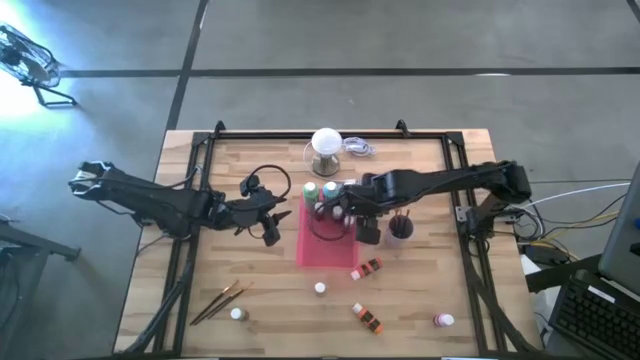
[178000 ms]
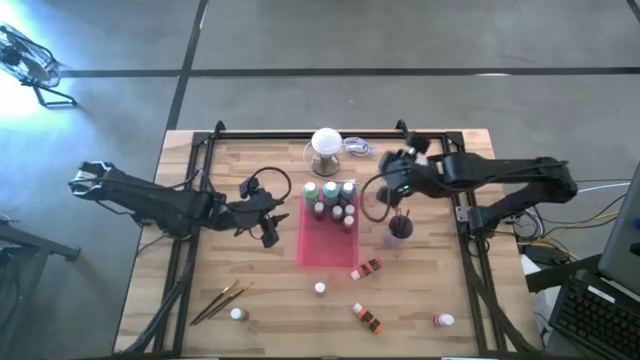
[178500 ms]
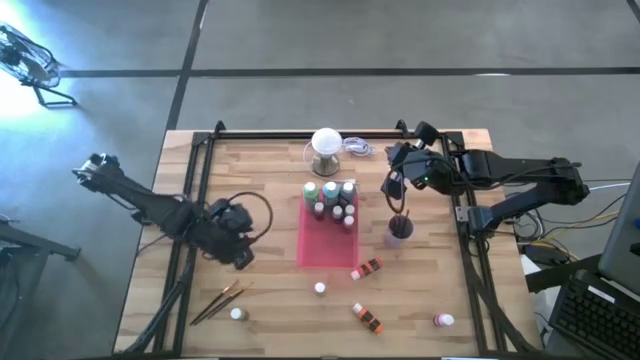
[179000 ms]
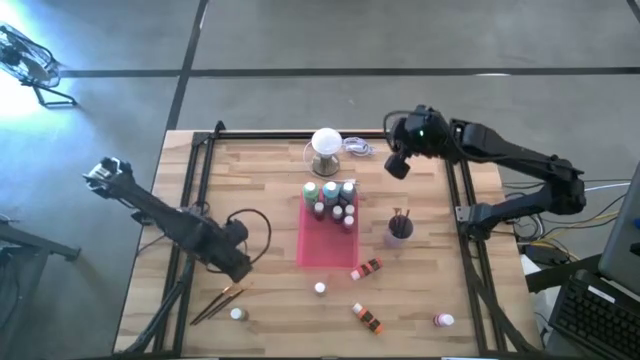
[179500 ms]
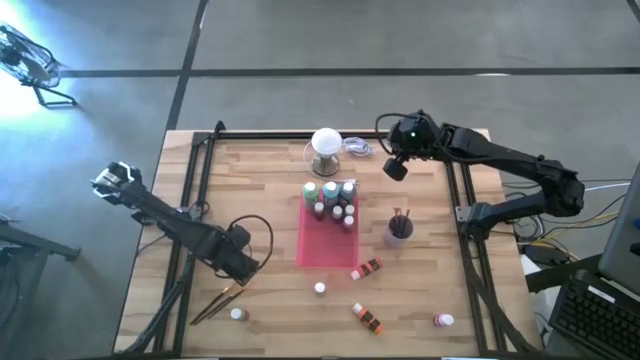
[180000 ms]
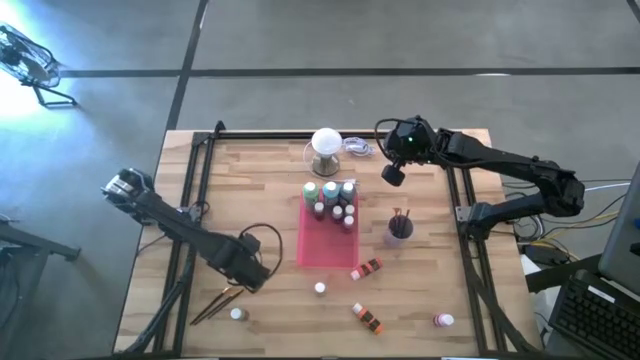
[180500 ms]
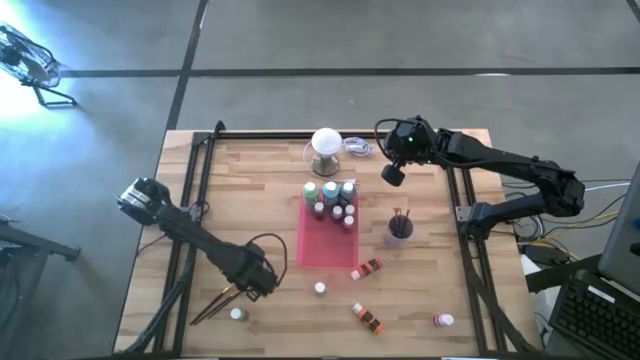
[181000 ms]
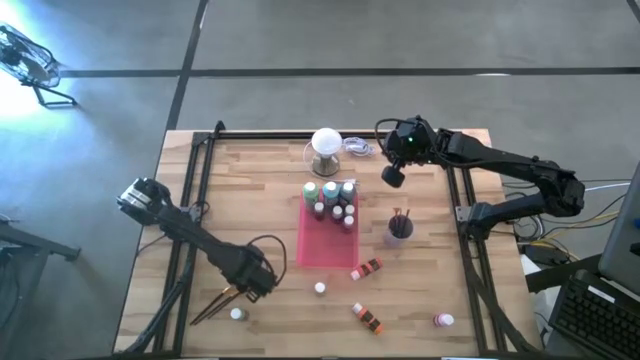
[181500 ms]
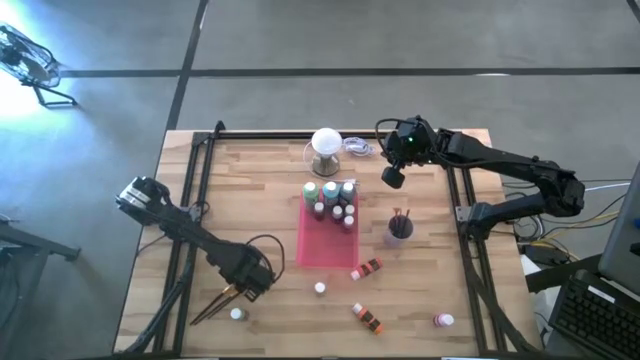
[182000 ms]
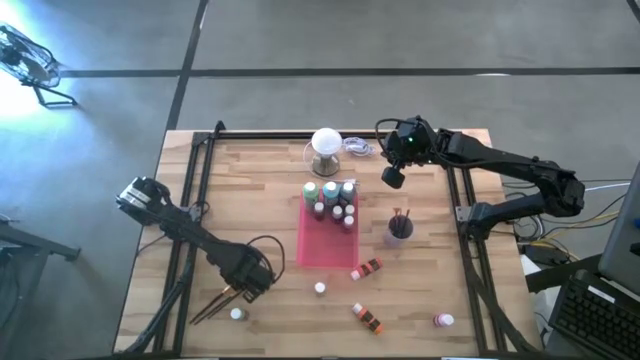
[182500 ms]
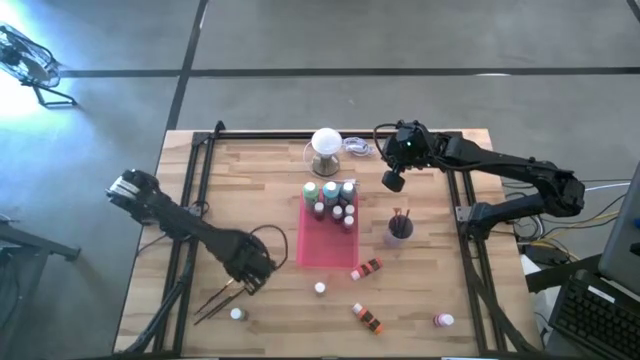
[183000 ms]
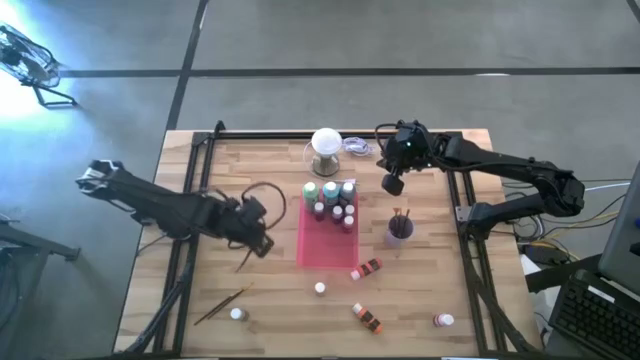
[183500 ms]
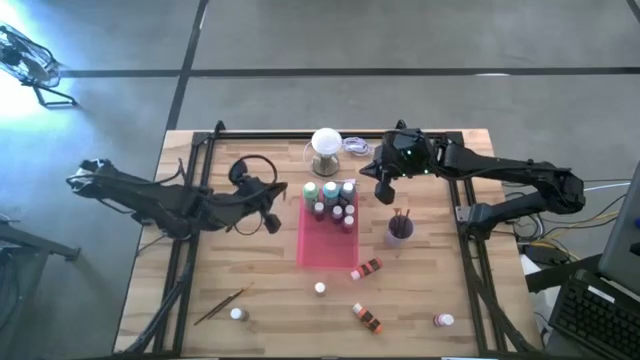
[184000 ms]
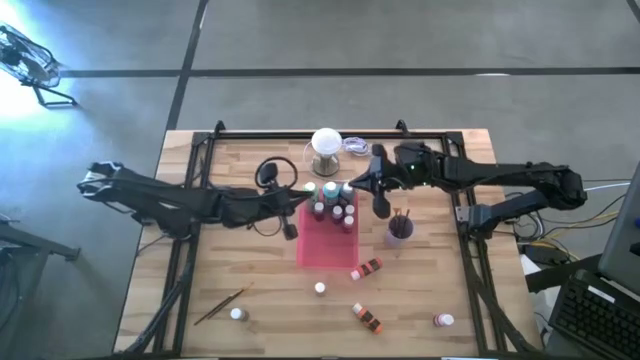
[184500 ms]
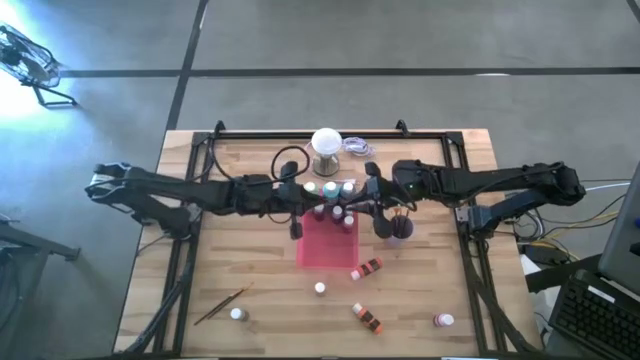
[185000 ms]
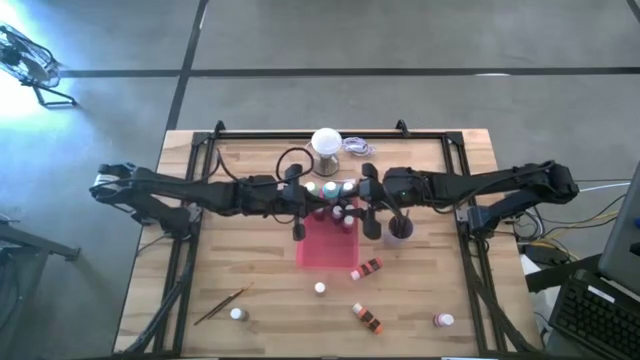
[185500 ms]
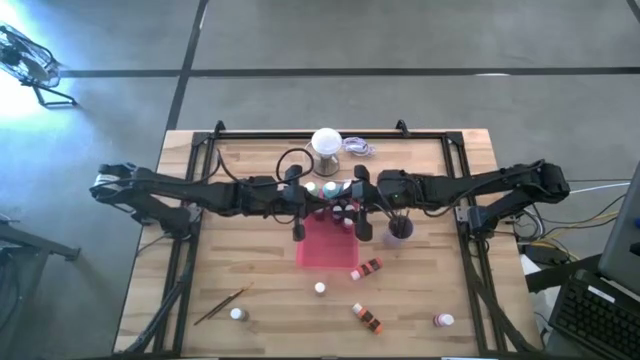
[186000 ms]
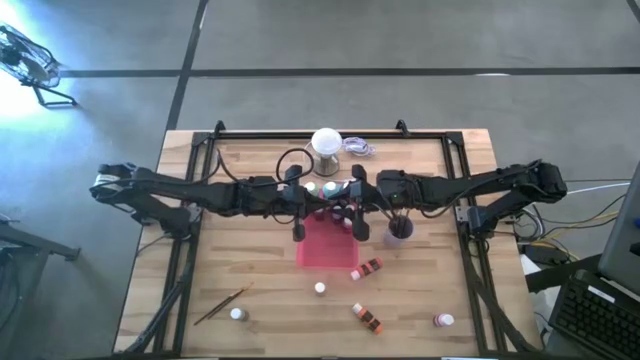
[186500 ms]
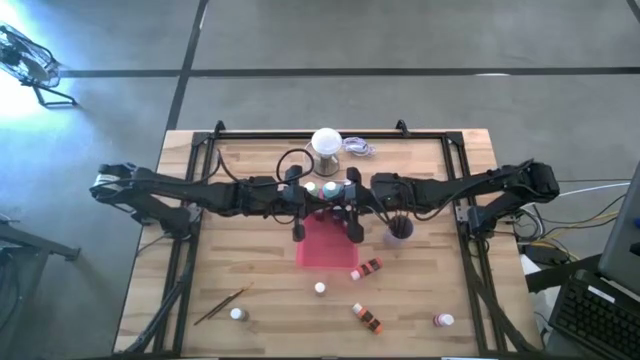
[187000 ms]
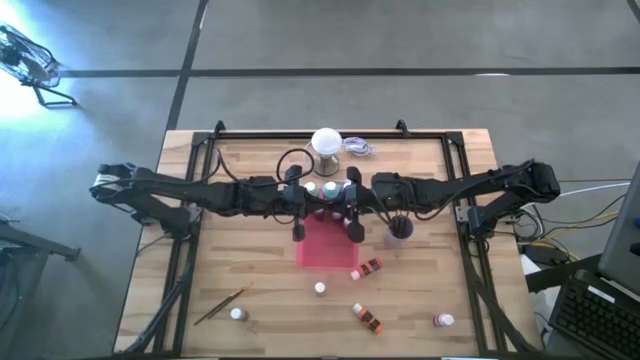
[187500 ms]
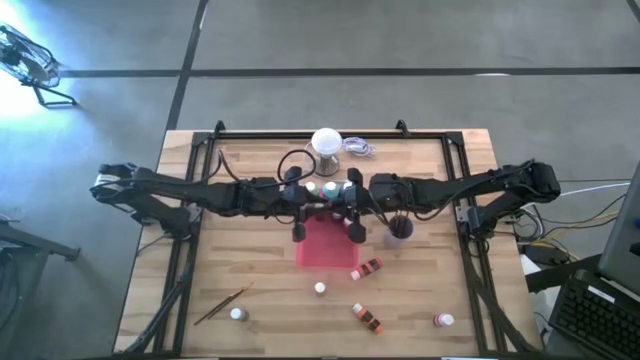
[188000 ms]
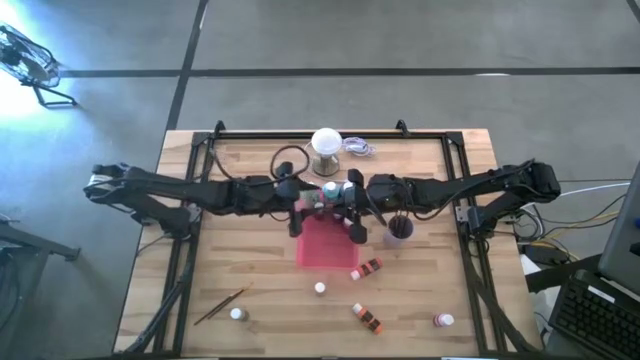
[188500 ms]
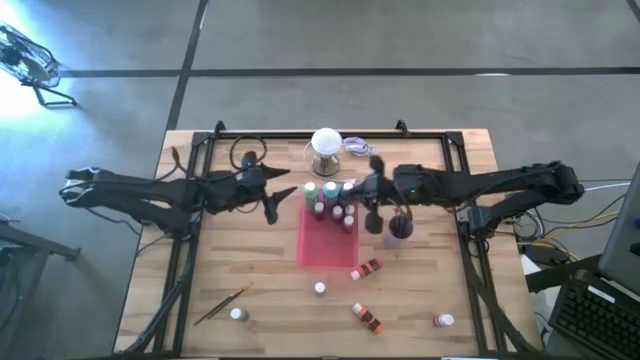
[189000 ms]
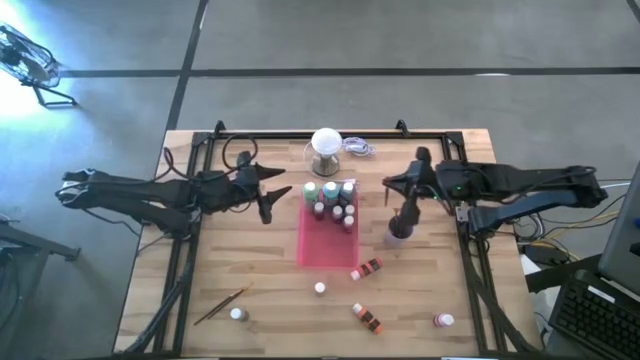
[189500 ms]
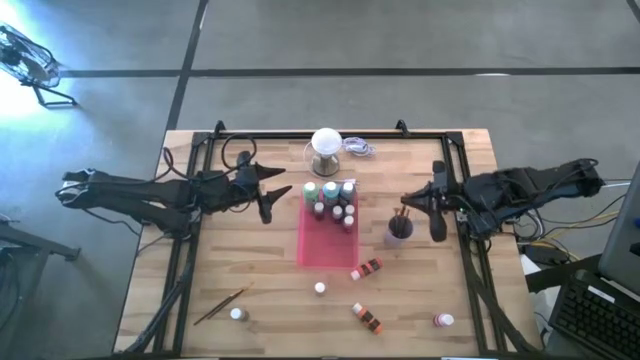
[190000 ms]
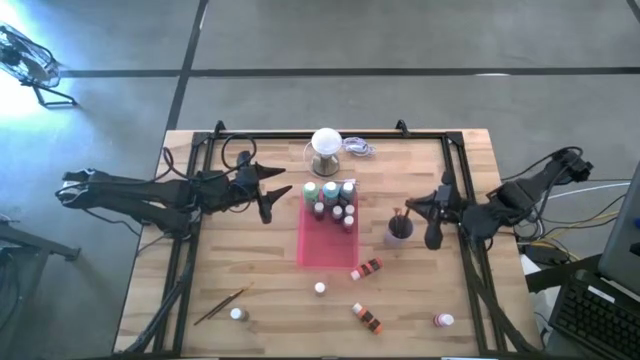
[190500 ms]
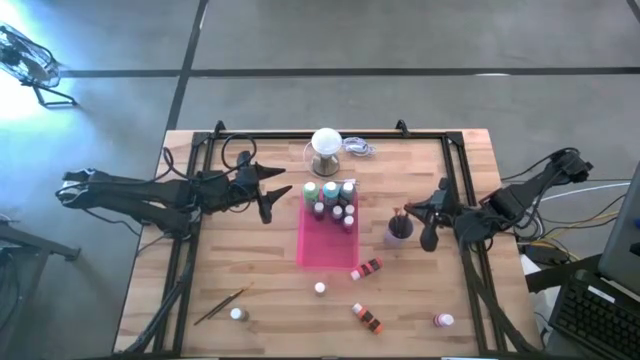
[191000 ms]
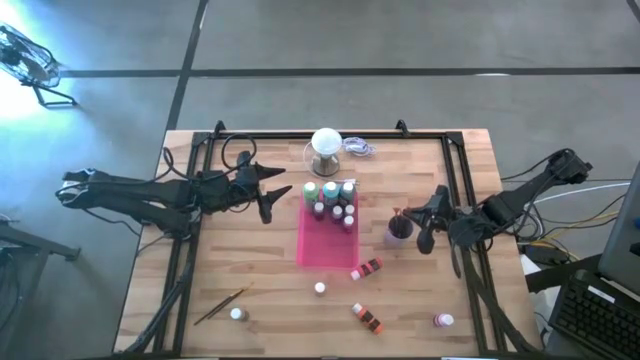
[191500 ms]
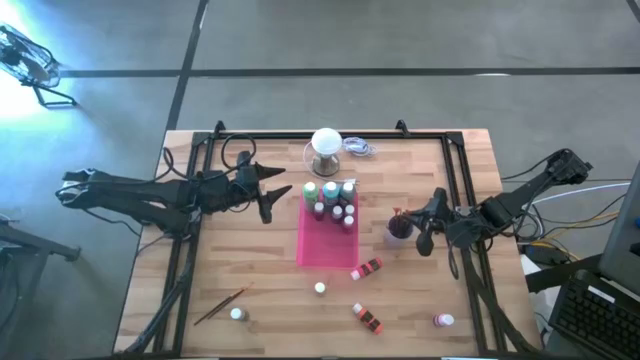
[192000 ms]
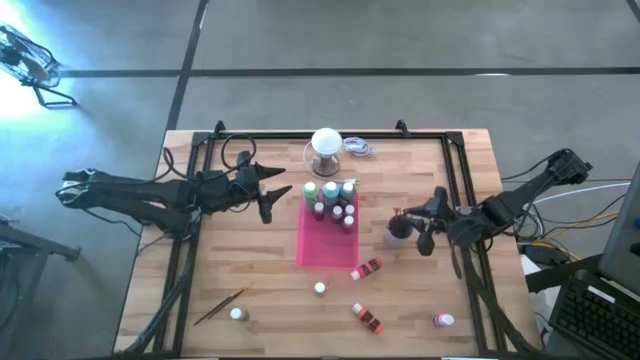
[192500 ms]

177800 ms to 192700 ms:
Task: Pick & Place Paint Supplies
Put the orange paintbrush into the purple cup

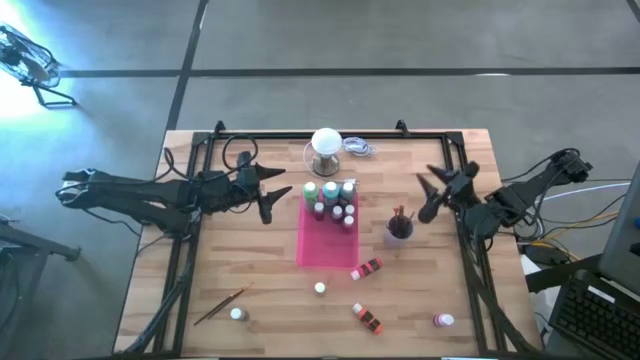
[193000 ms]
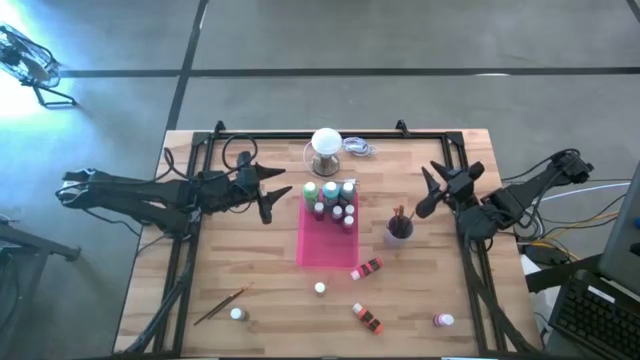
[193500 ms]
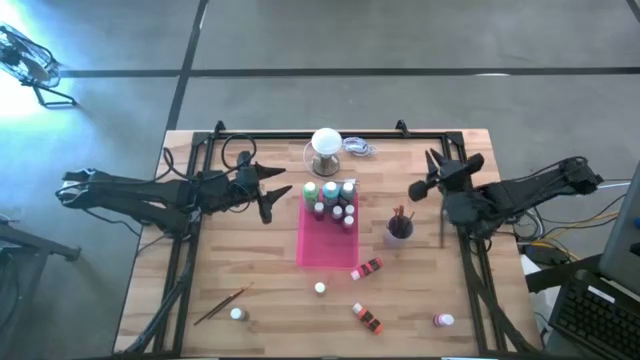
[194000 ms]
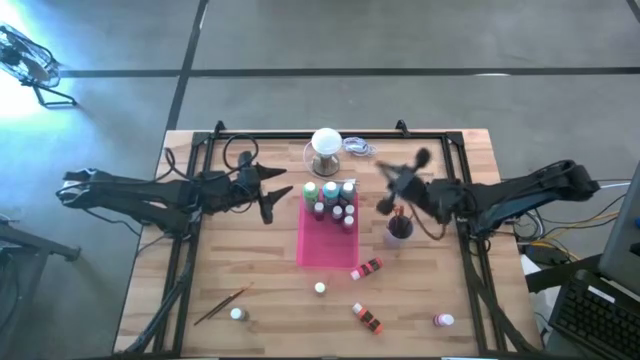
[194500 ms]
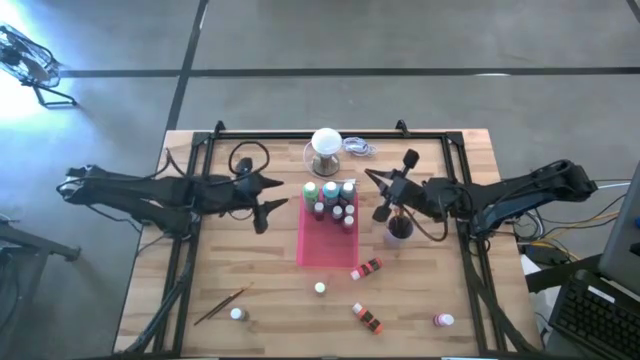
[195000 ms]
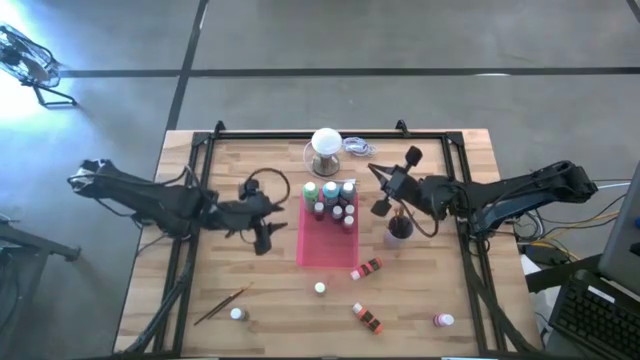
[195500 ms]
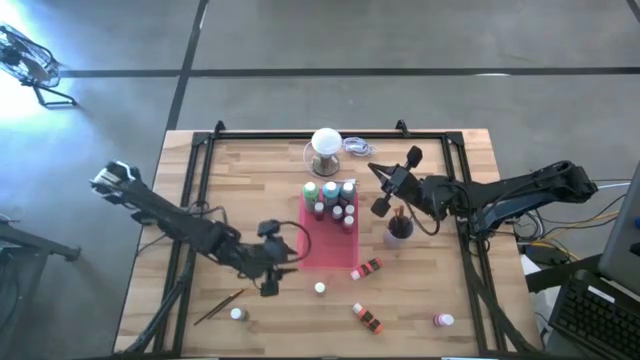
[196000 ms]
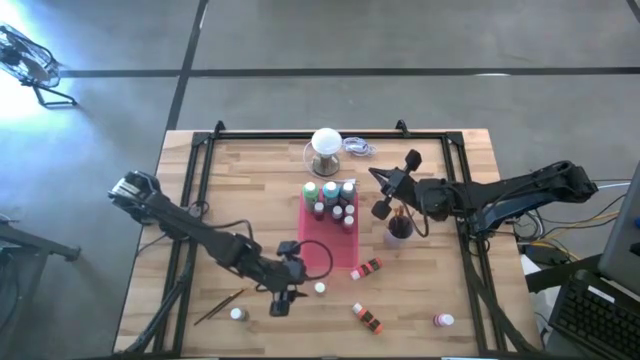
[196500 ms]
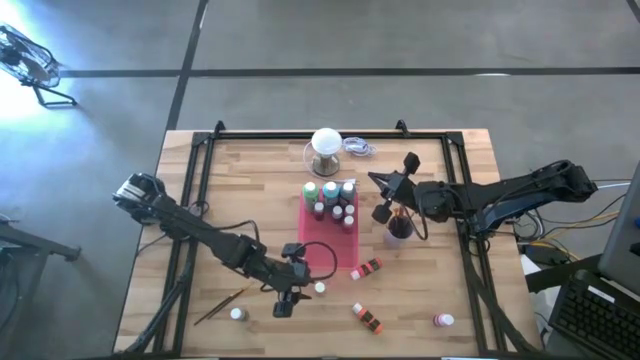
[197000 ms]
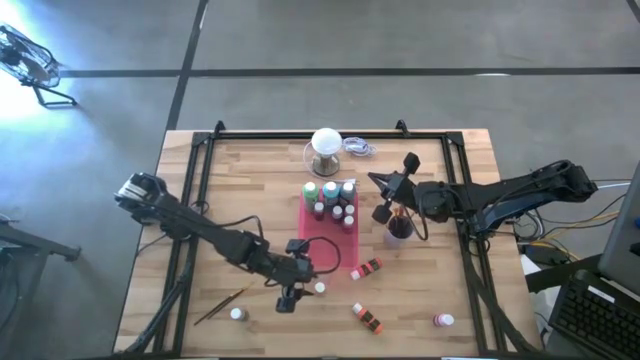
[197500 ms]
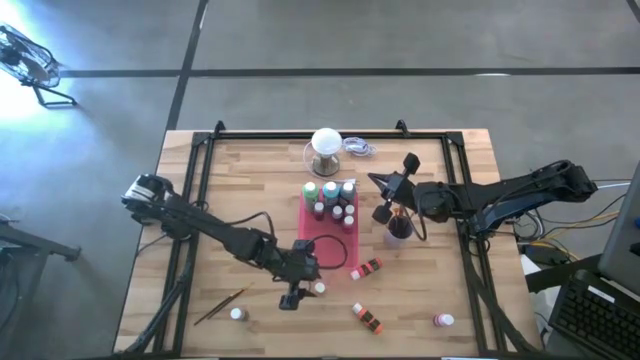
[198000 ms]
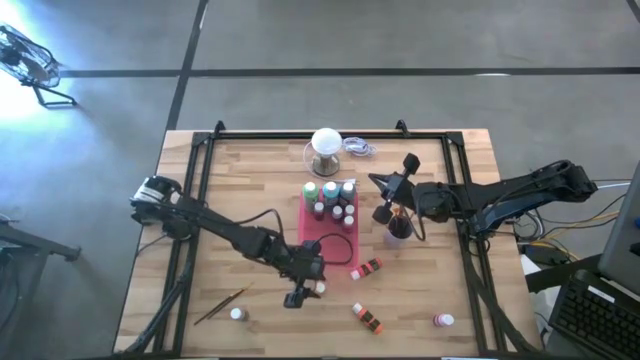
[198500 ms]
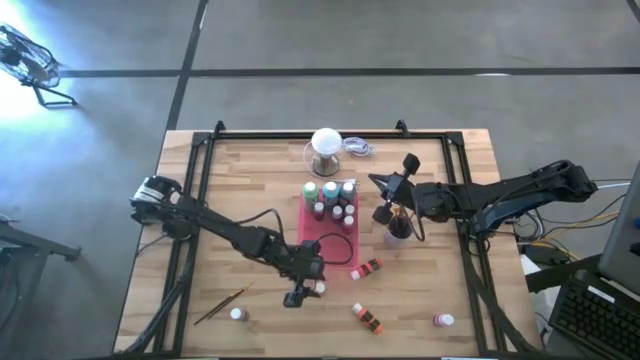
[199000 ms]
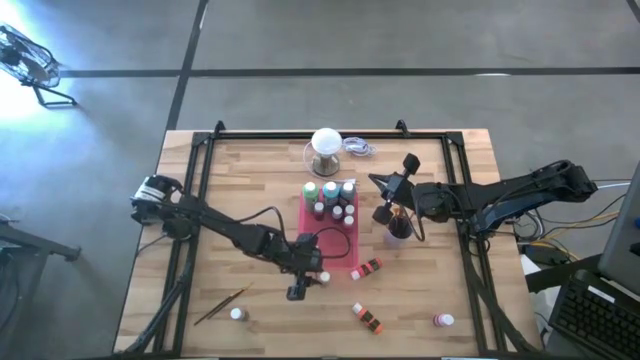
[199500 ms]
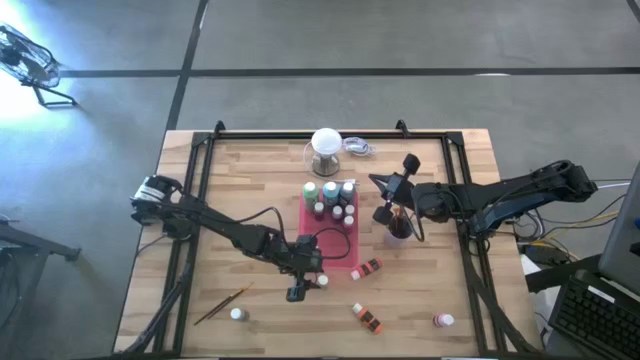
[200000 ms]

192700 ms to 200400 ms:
Put the small yellow paint bottle into the red bin
